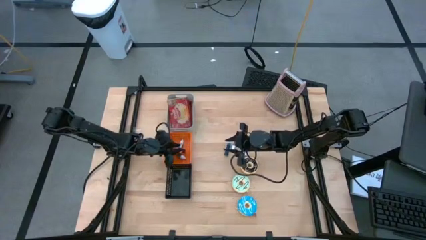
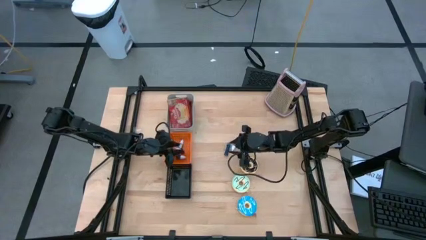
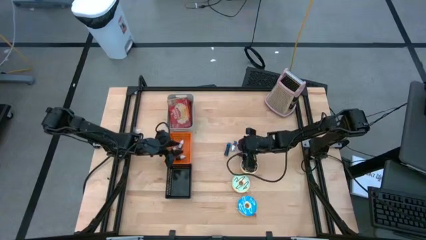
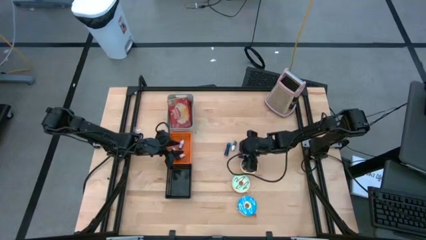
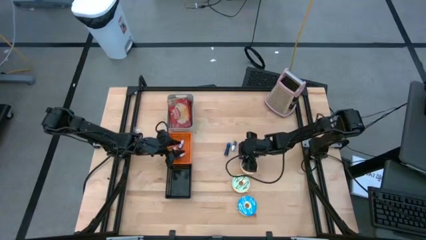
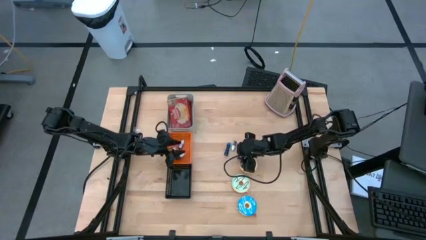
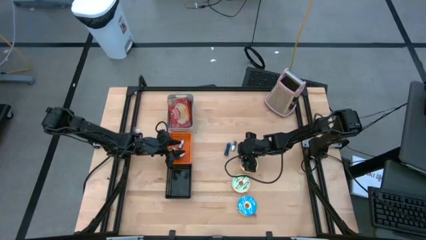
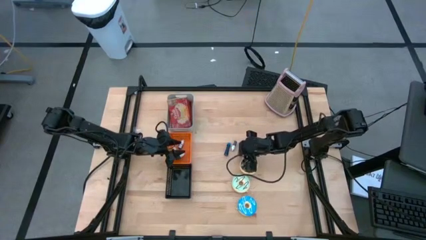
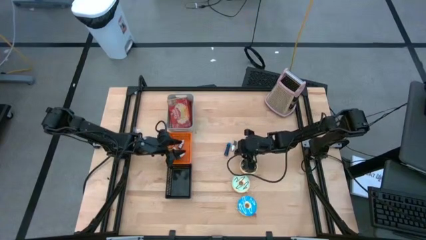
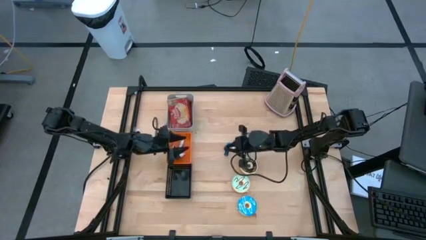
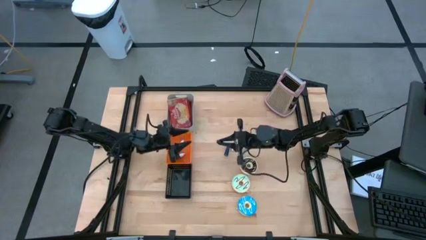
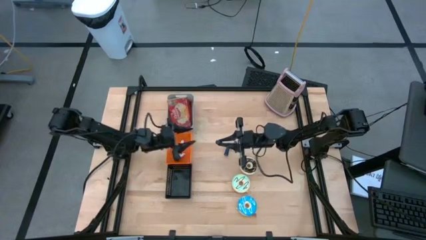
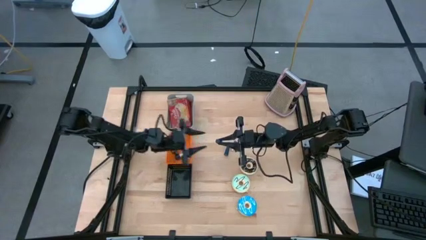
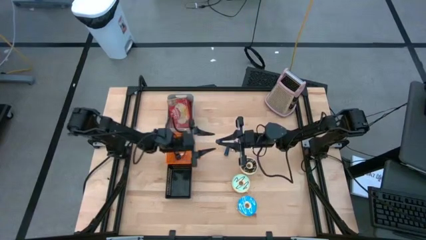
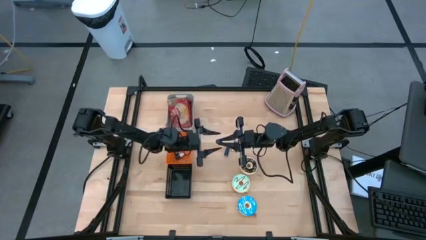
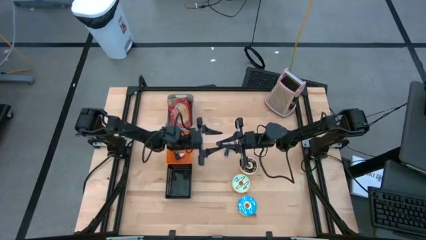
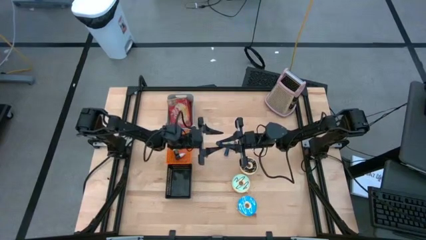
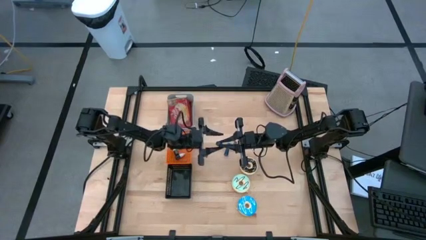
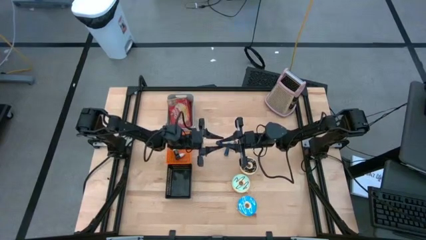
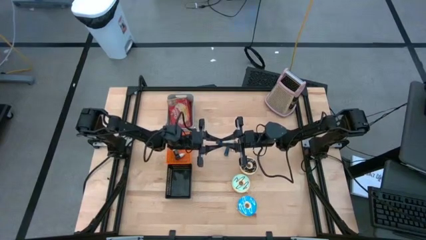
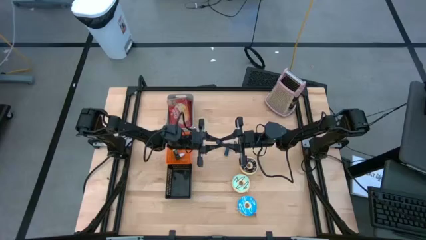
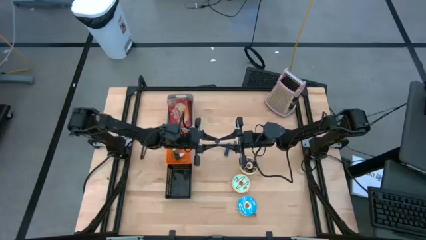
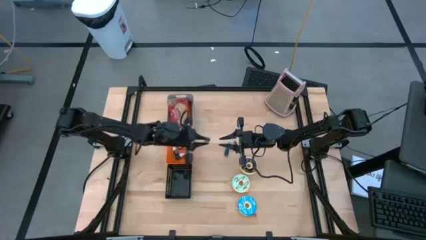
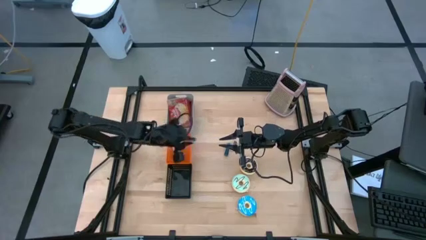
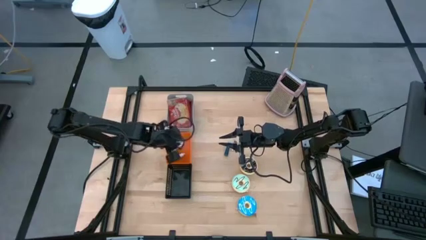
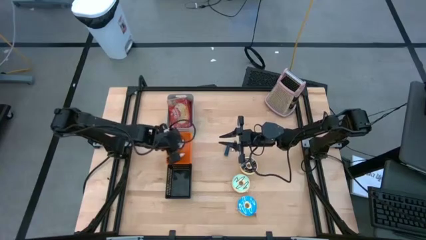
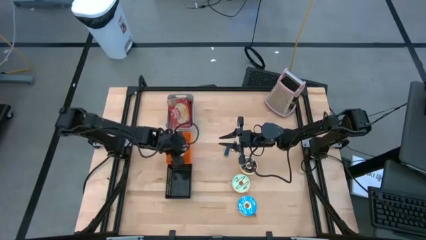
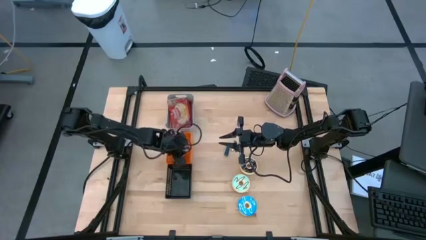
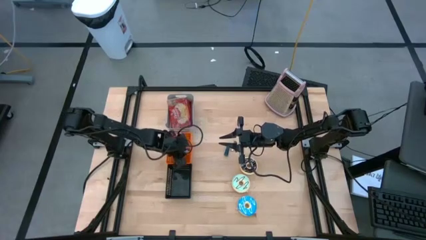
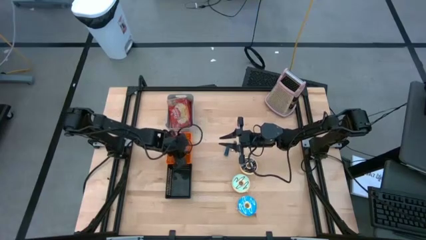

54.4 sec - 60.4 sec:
Put the dark blue food coloring bottle into the orange bin

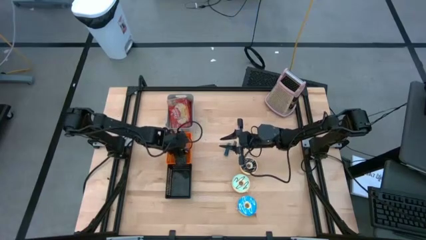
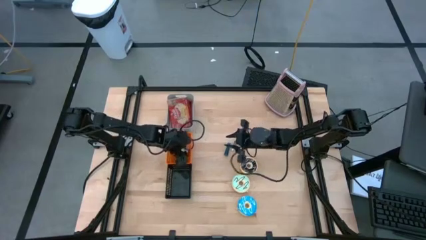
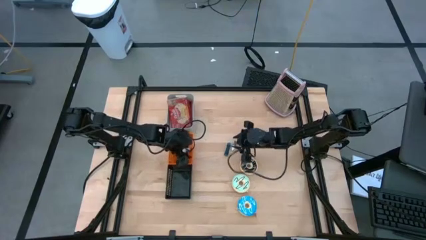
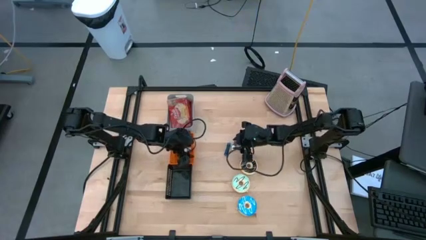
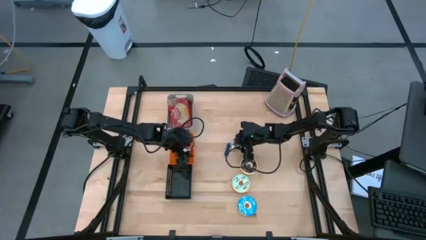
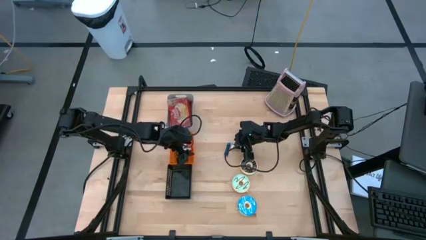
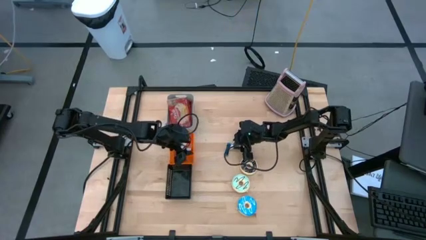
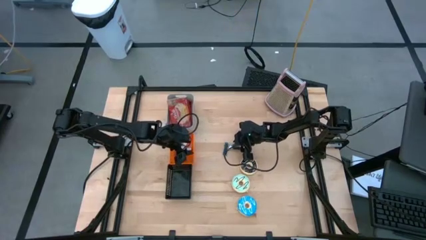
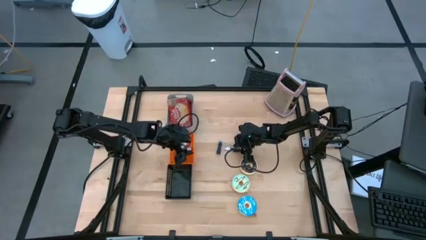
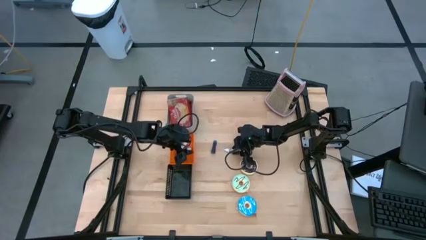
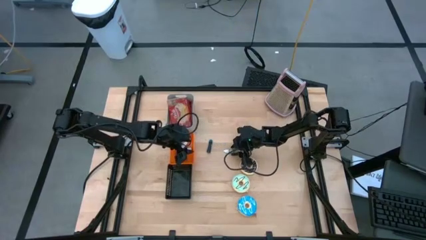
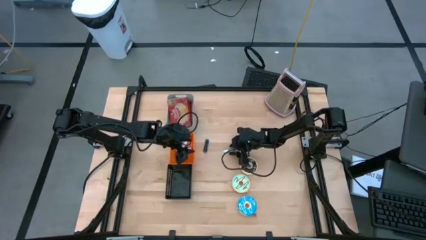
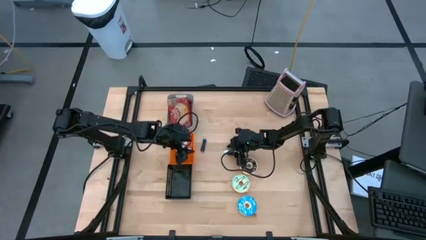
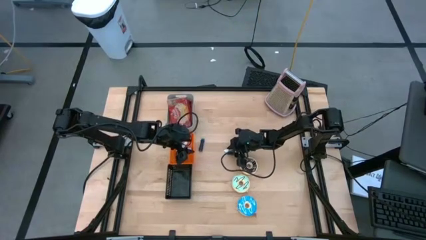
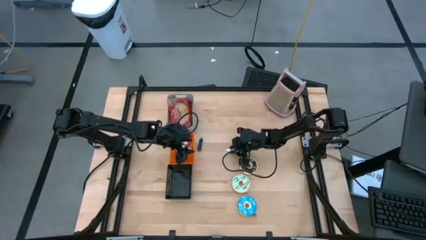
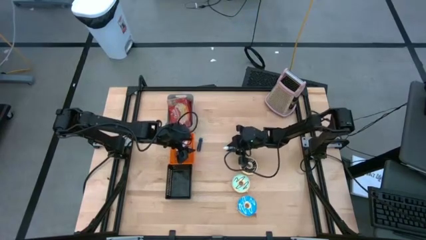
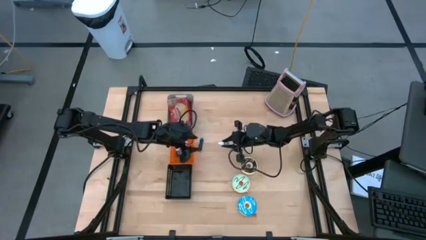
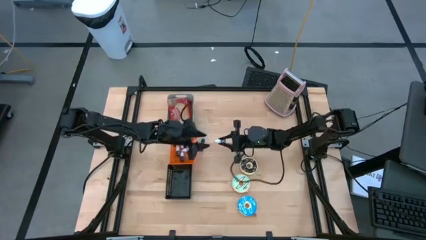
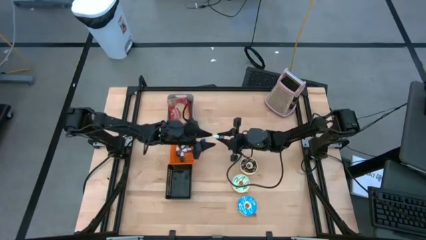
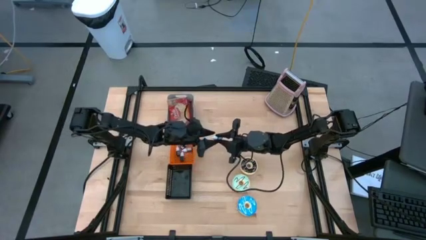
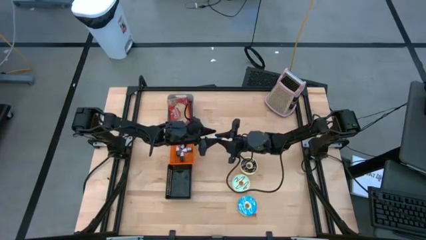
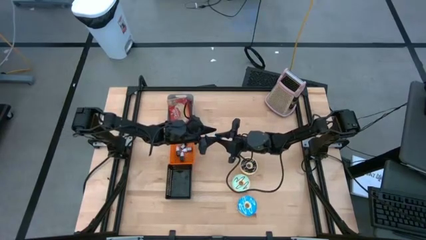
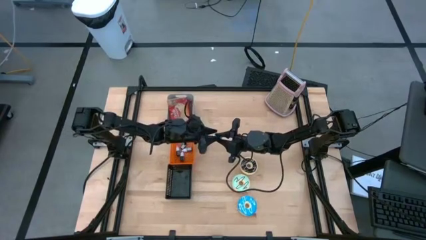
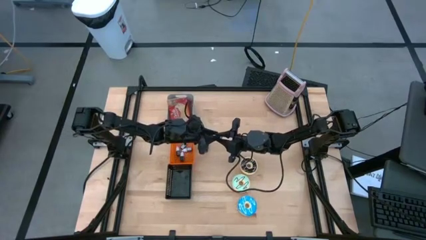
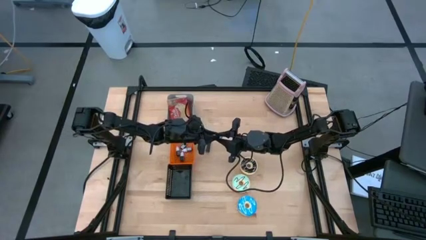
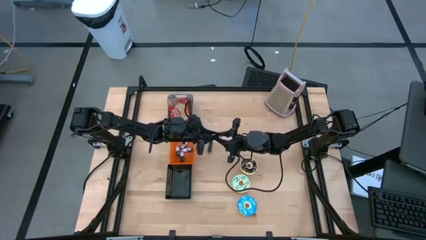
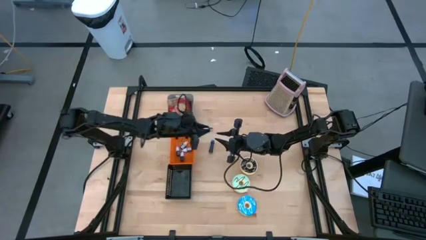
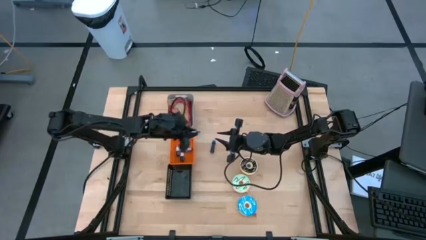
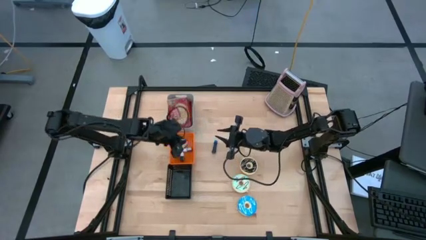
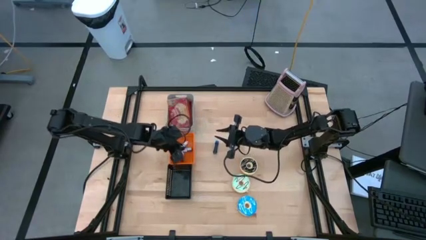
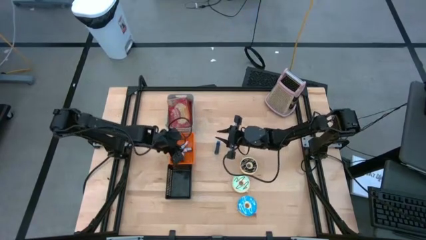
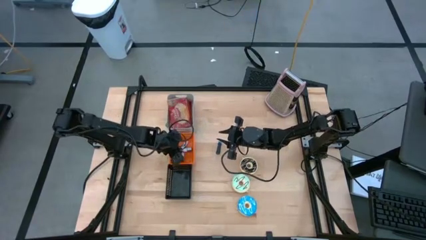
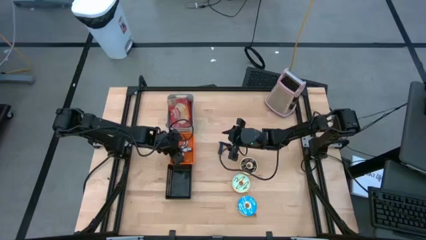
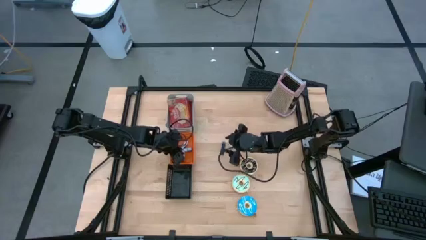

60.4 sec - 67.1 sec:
Put the brown food coloring bottle into the orange bin

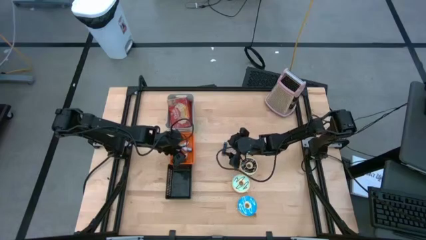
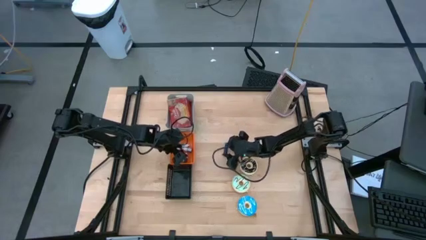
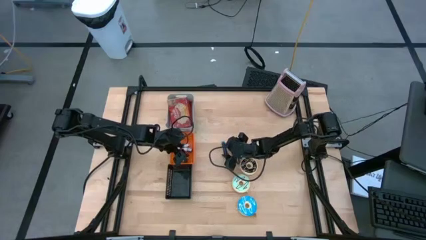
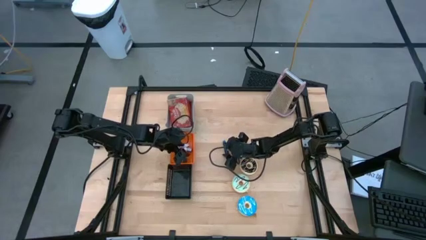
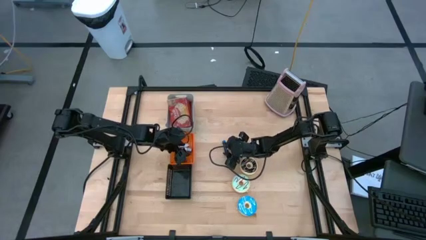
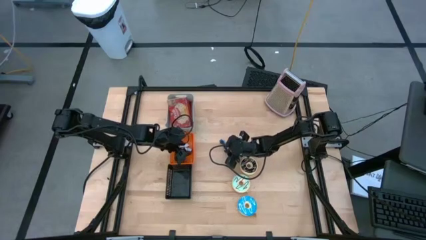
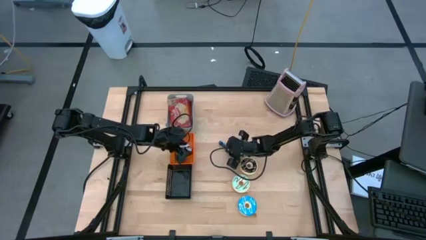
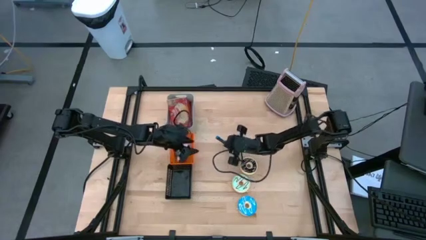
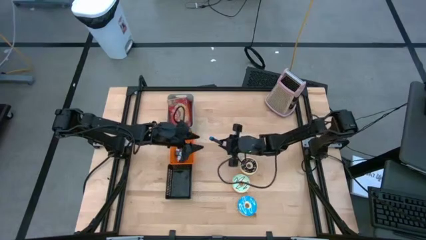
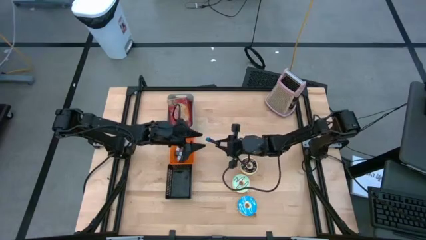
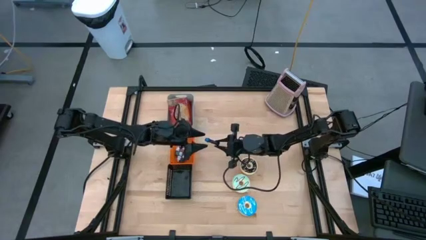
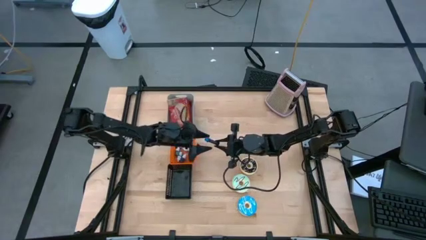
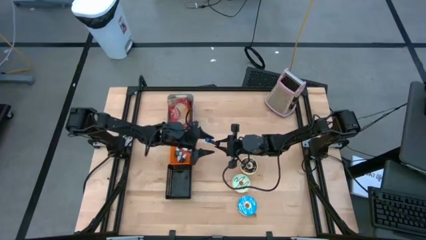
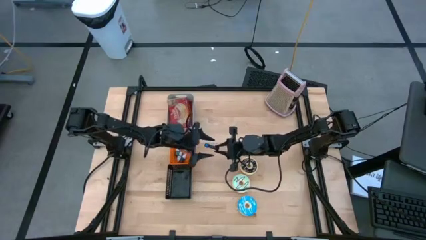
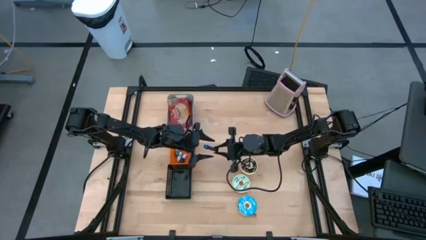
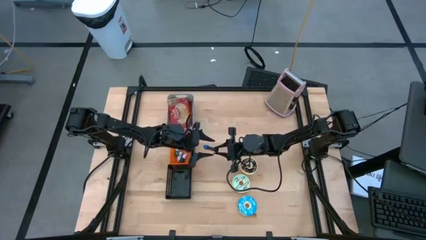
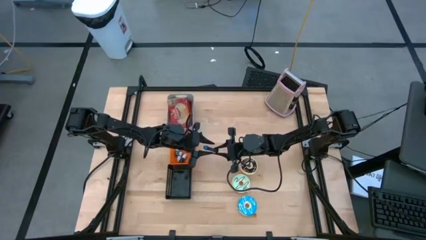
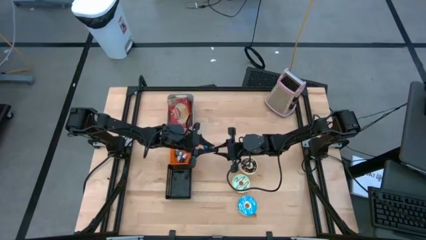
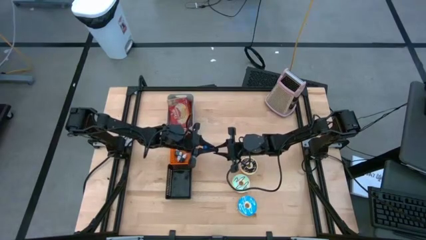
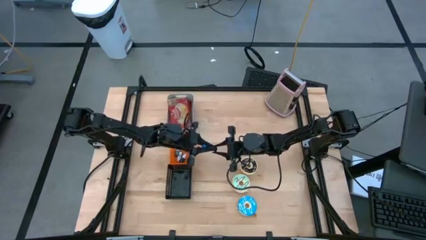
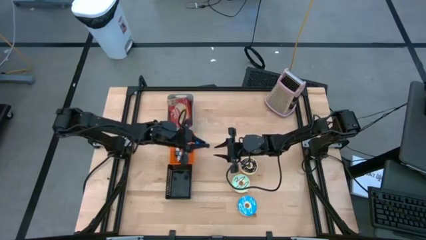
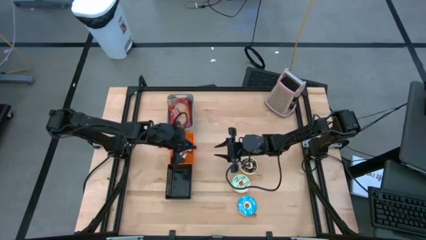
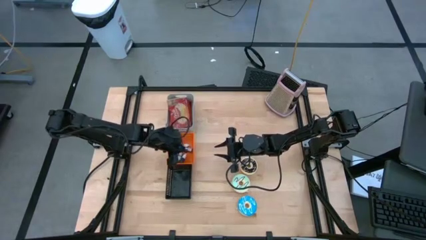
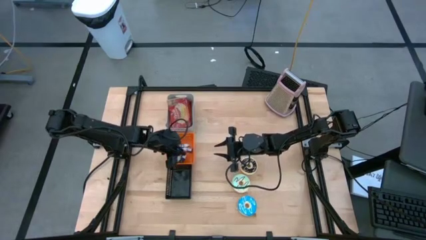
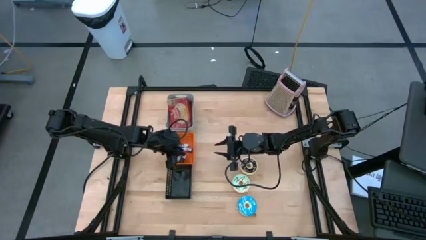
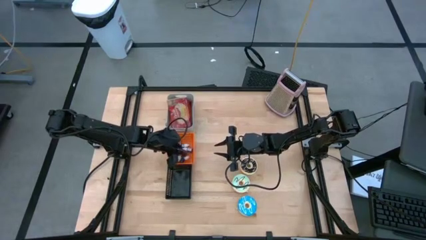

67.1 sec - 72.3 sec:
Put the blue food coloring bottle into the orange bin
